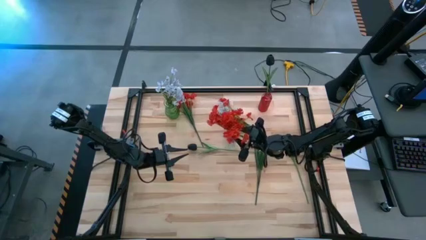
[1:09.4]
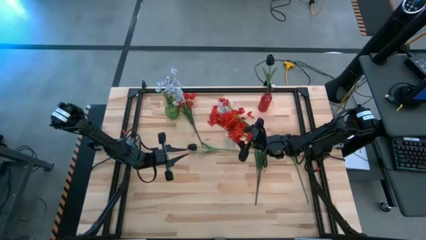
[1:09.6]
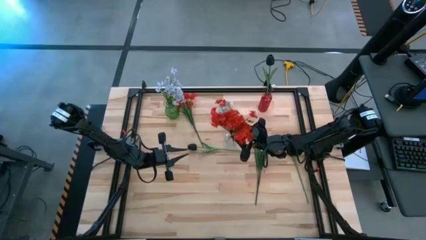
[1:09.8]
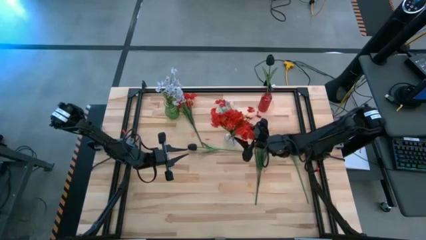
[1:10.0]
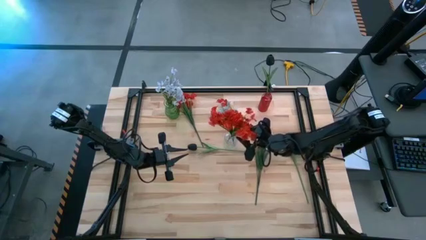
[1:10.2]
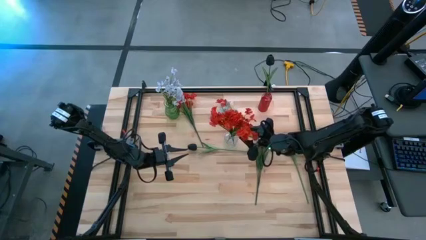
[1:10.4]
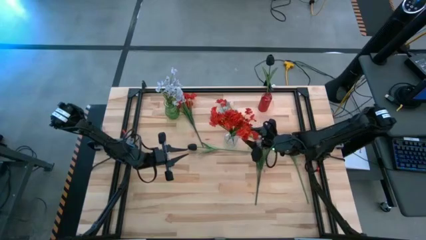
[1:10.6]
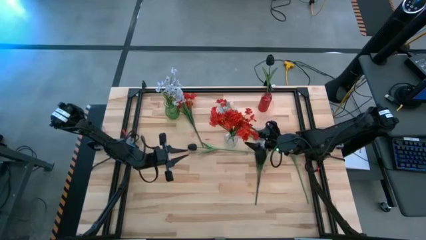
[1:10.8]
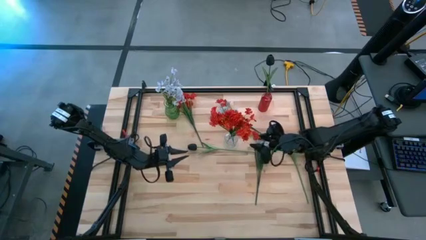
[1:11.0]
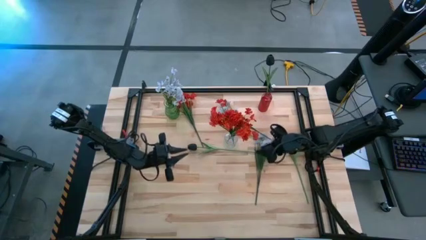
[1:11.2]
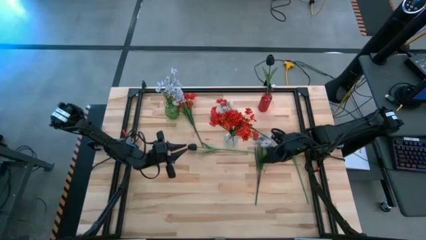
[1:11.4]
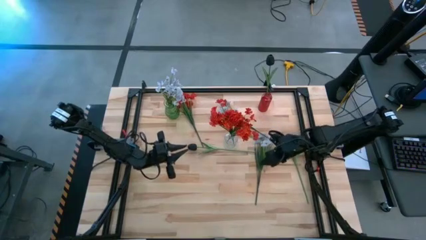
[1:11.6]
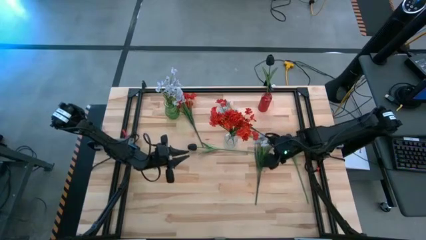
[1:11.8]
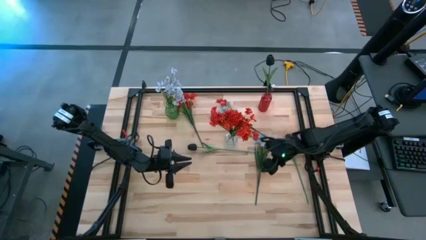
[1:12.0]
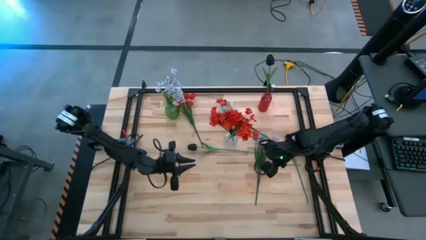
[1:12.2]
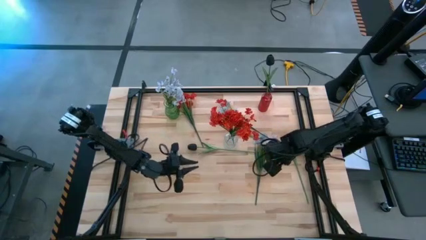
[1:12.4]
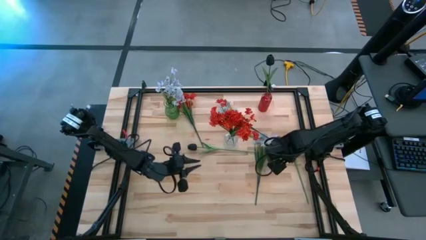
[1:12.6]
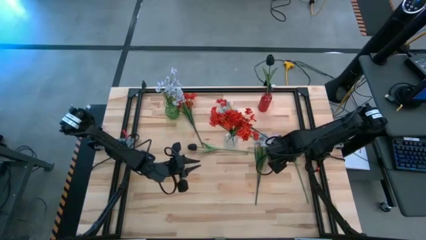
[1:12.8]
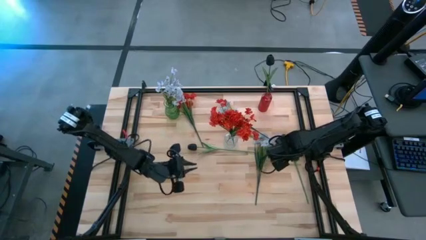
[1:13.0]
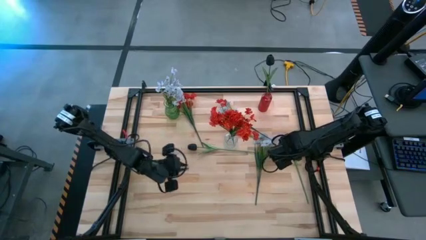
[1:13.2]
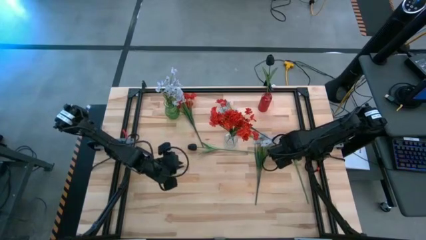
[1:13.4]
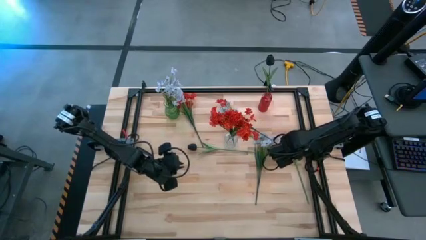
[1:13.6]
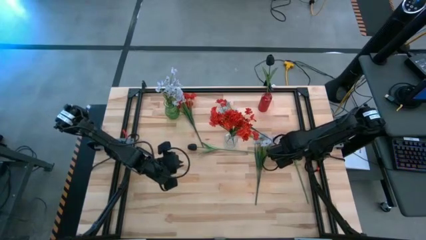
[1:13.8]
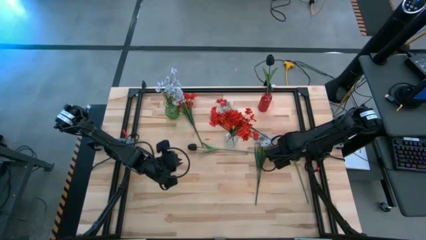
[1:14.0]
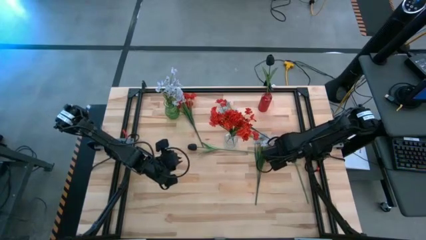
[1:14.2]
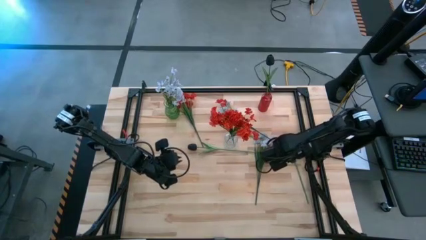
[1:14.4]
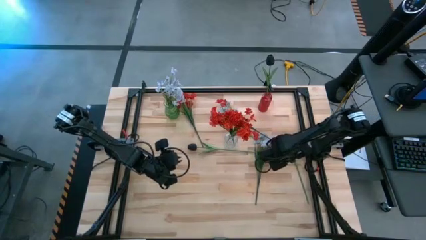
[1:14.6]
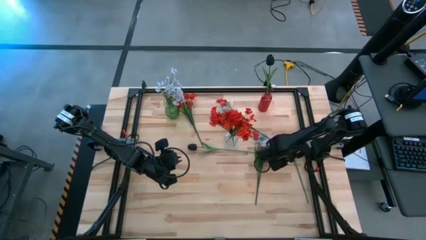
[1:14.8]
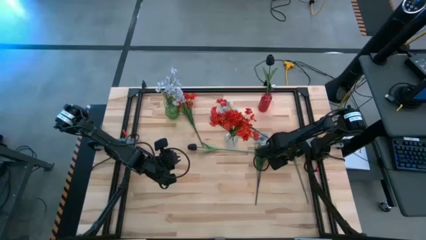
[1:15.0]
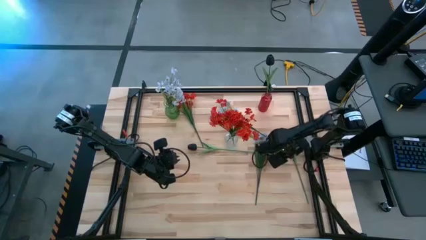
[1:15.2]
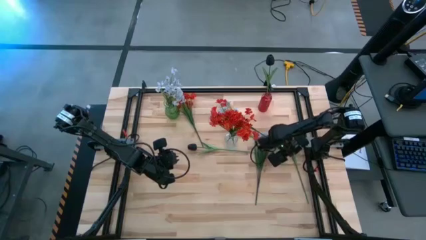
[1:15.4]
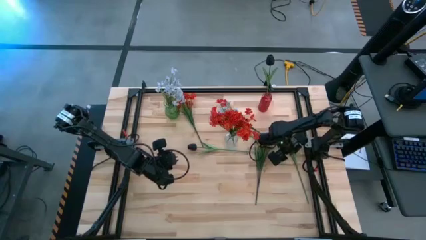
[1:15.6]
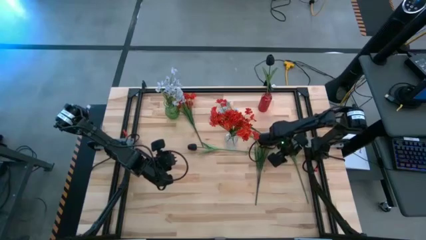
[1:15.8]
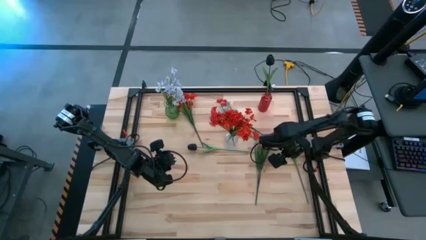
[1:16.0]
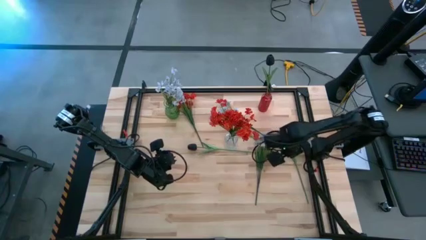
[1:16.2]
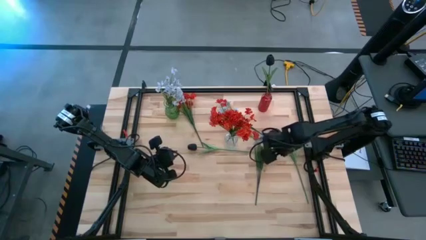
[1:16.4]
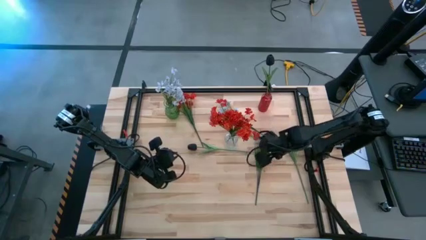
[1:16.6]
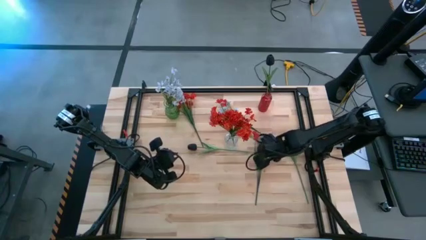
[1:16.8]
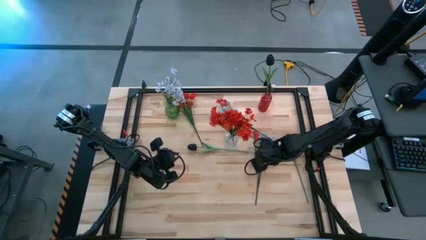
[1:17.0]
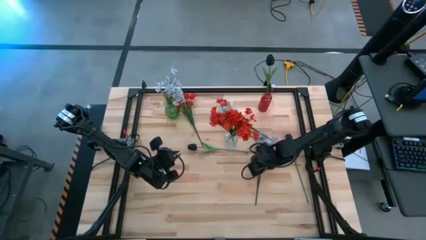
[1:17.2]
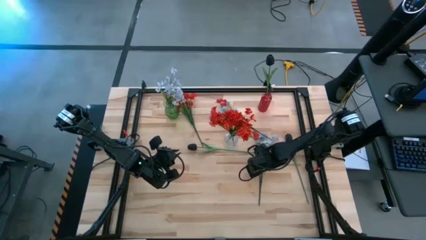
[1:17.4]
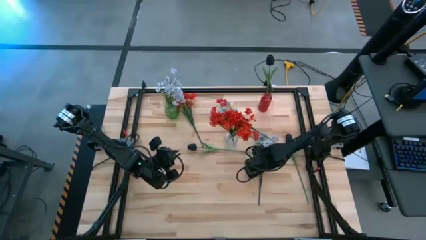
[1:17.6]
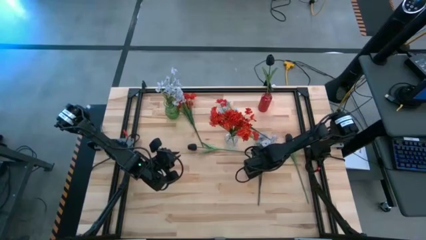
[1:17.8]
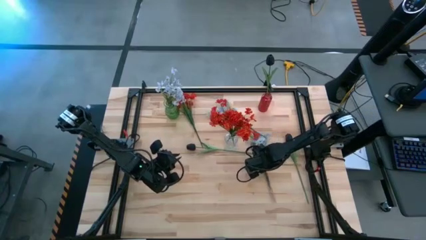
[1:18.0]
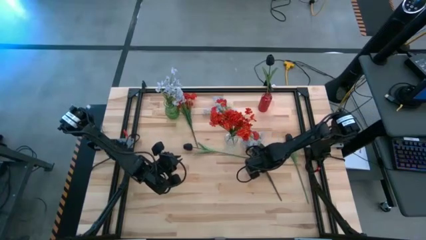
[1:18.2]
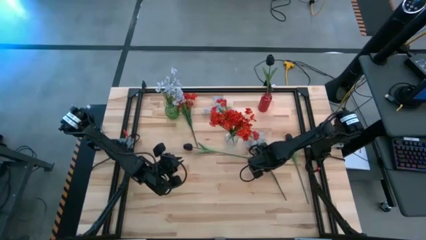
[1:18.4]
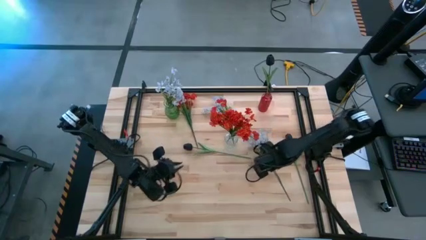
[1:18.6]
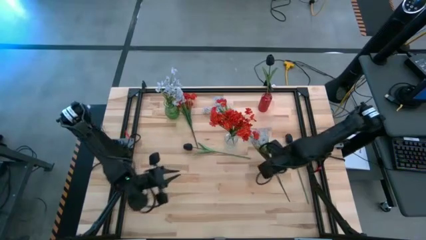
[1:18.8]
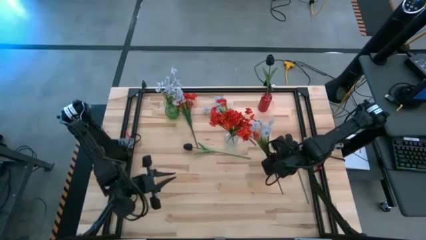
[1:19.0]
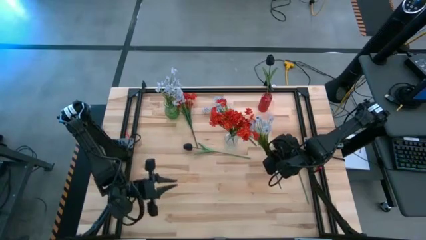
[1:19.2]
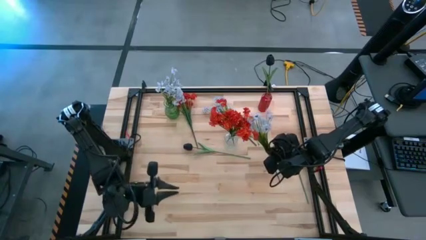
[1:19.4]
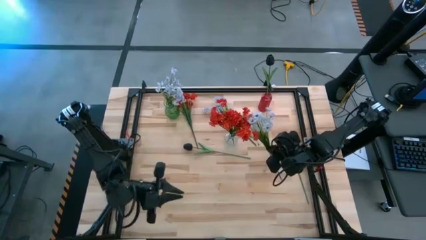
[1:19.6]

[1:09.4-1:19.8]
Task: Sort flowers into vase by color
Put the bottom white flower into the green vase
